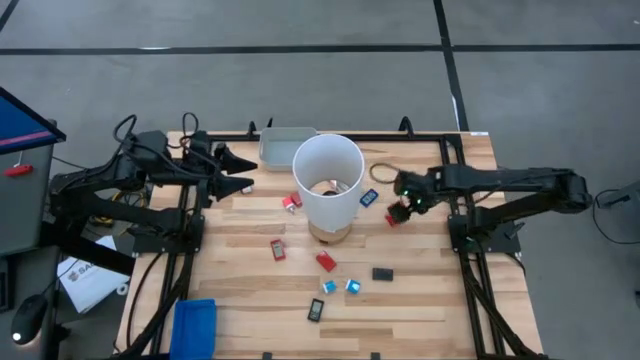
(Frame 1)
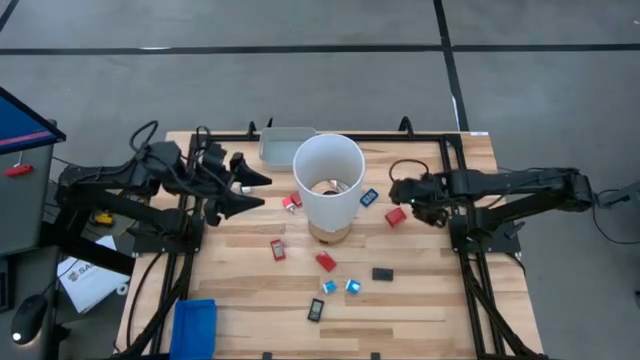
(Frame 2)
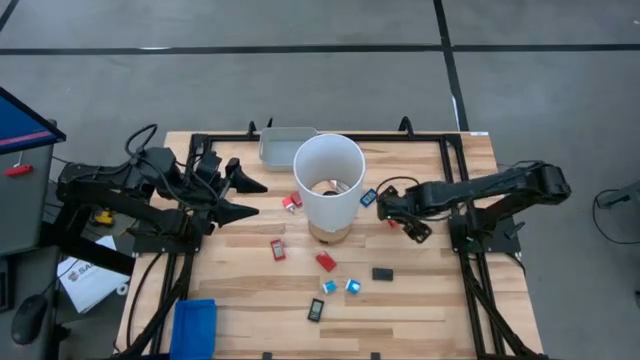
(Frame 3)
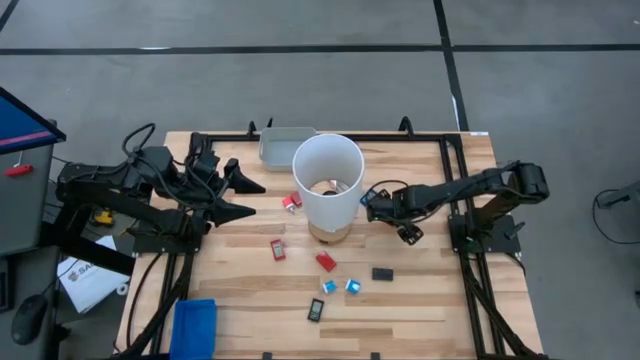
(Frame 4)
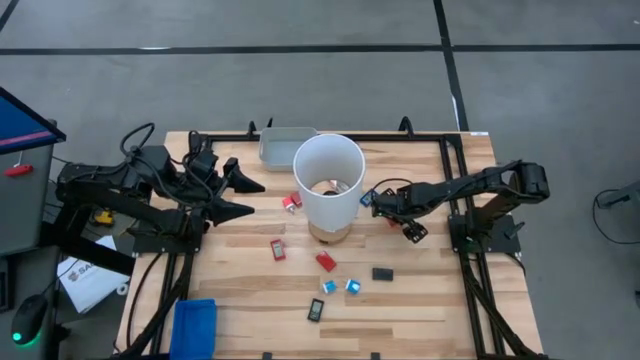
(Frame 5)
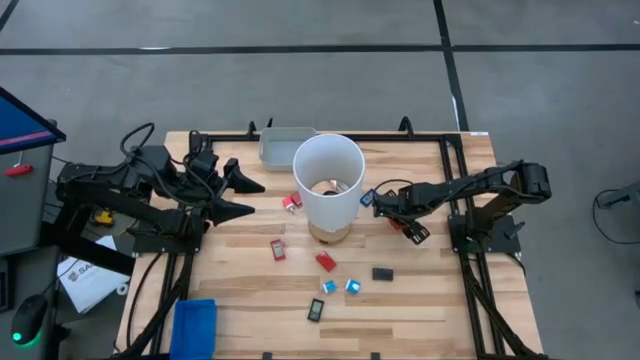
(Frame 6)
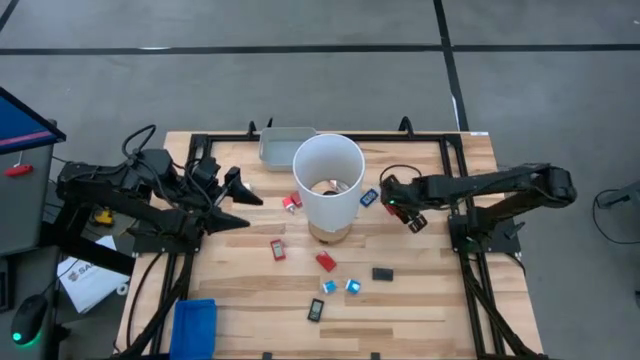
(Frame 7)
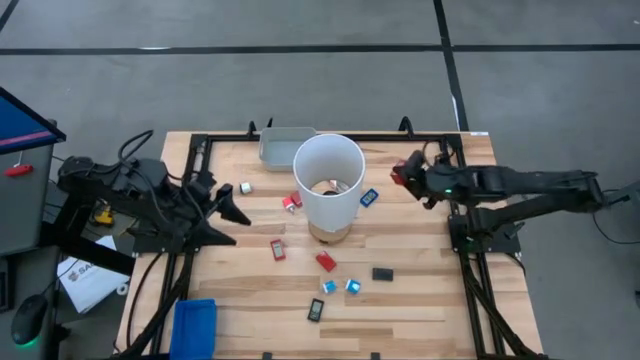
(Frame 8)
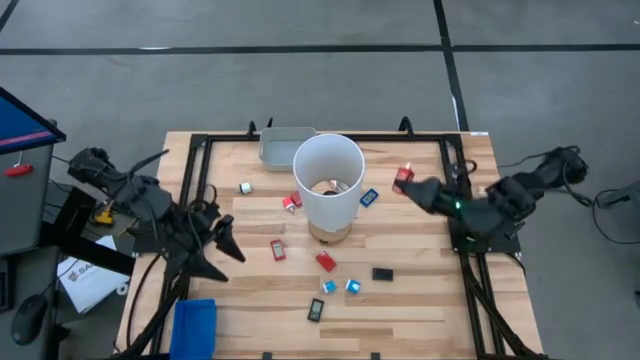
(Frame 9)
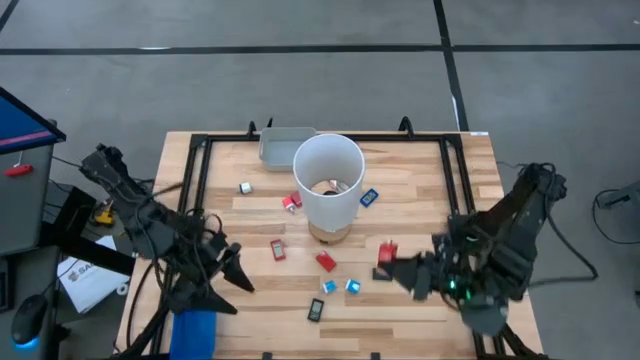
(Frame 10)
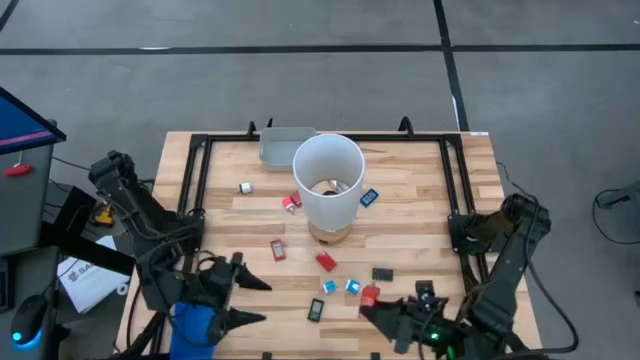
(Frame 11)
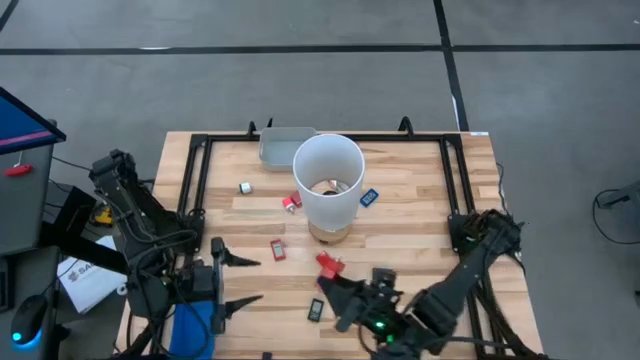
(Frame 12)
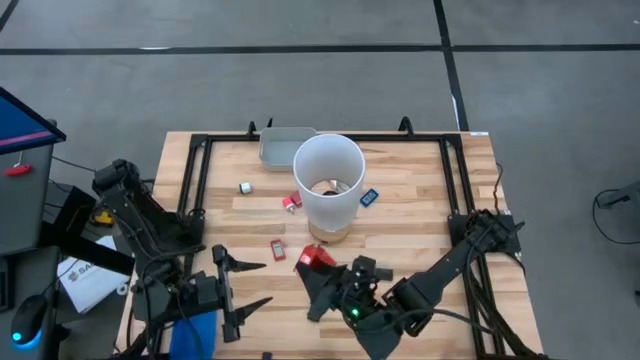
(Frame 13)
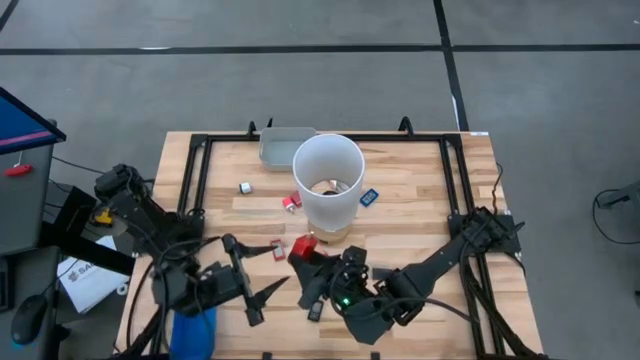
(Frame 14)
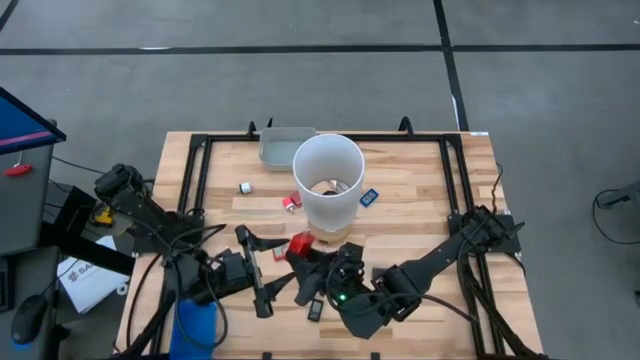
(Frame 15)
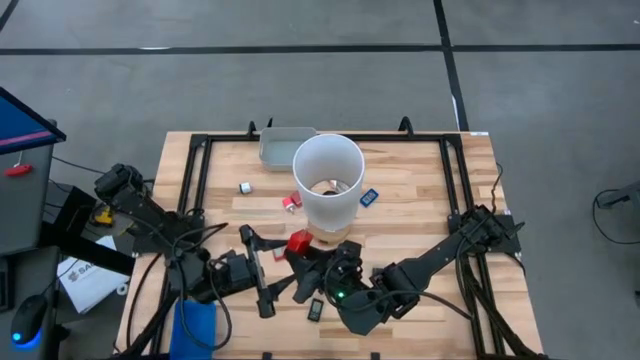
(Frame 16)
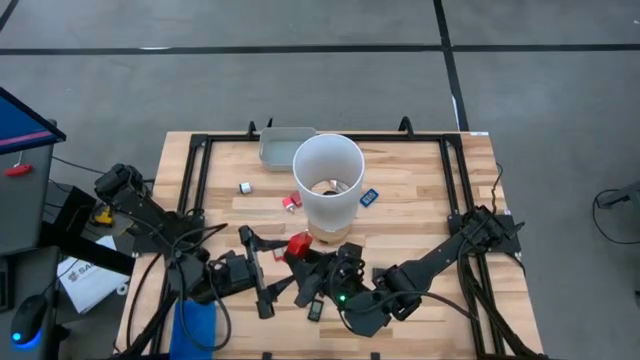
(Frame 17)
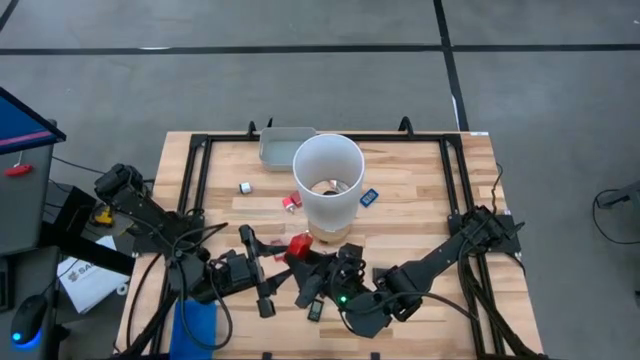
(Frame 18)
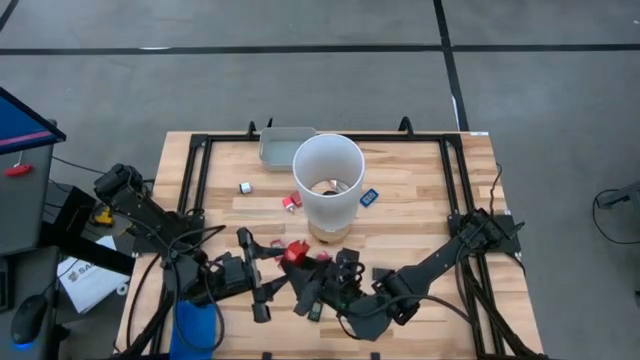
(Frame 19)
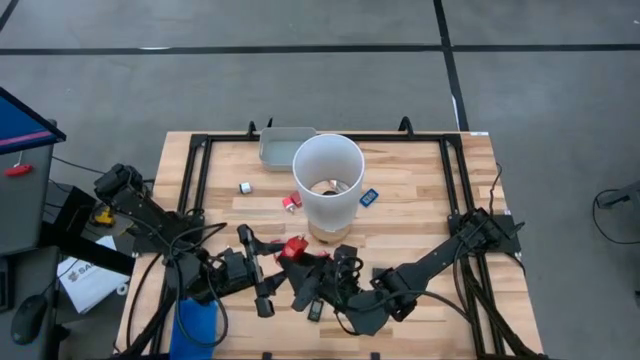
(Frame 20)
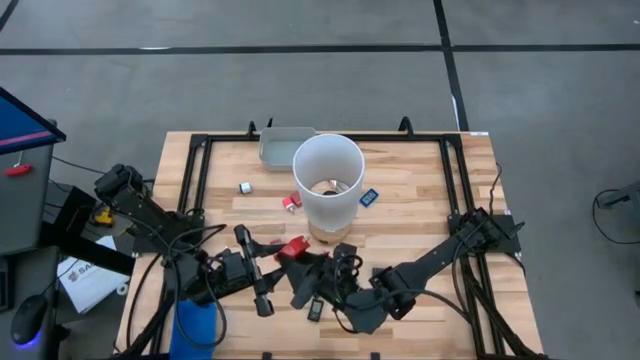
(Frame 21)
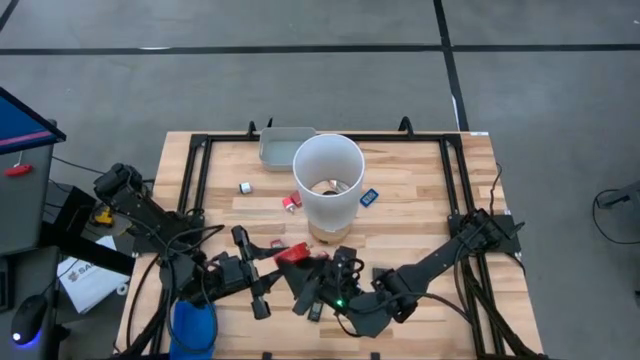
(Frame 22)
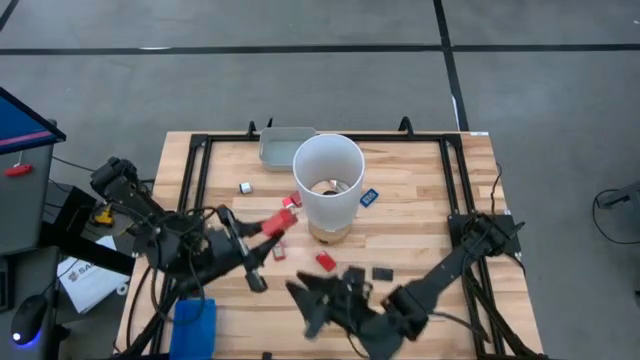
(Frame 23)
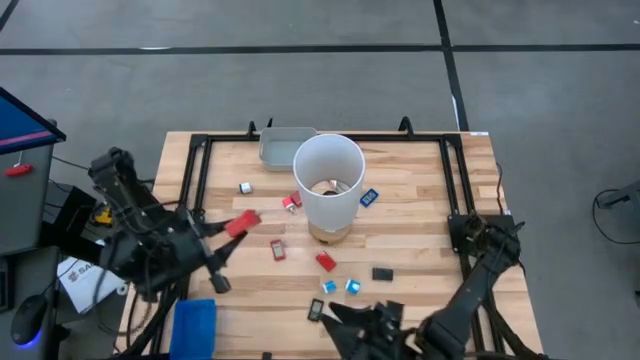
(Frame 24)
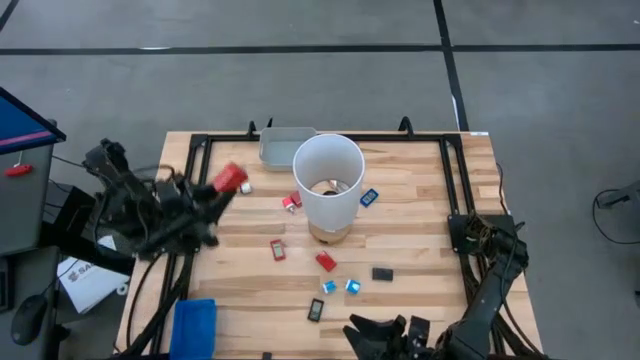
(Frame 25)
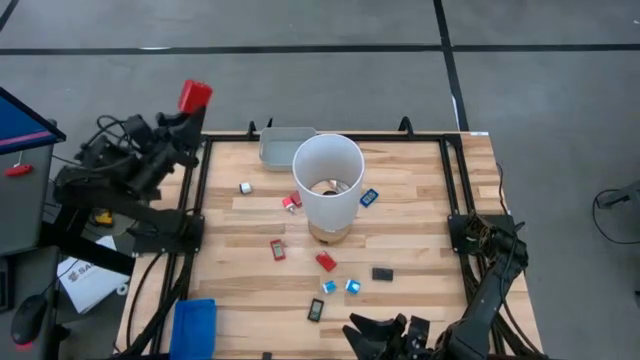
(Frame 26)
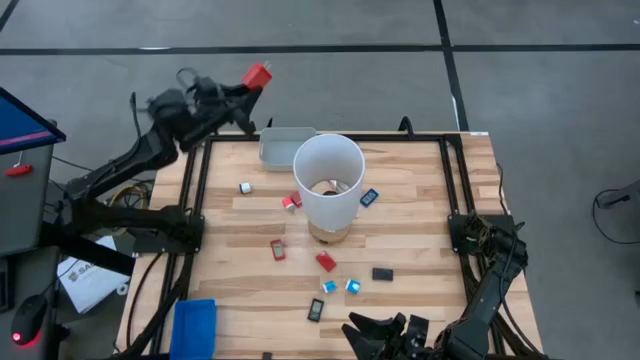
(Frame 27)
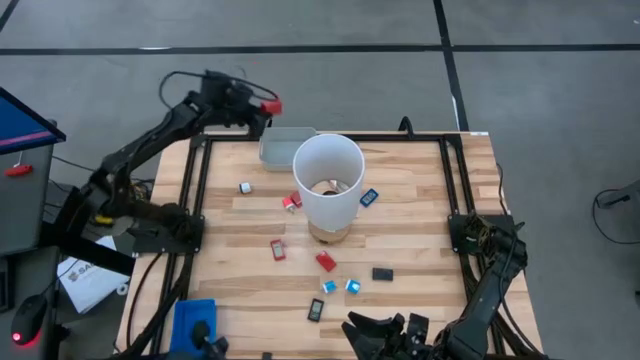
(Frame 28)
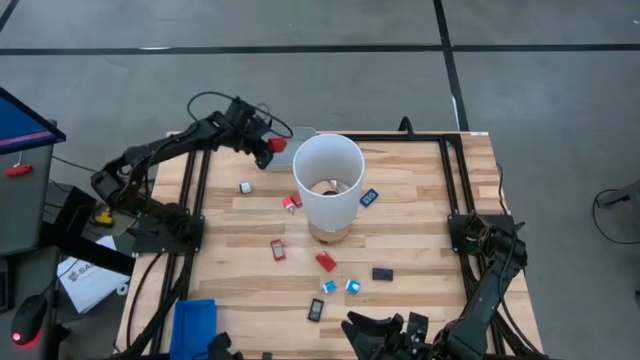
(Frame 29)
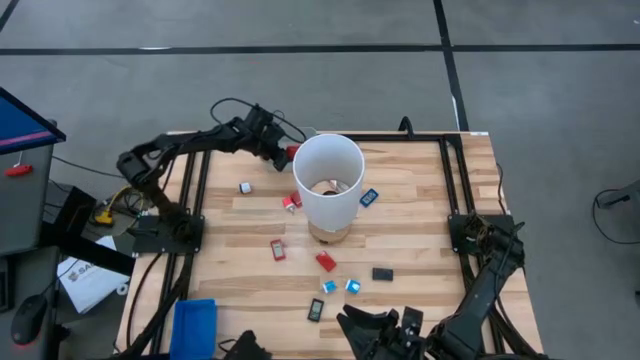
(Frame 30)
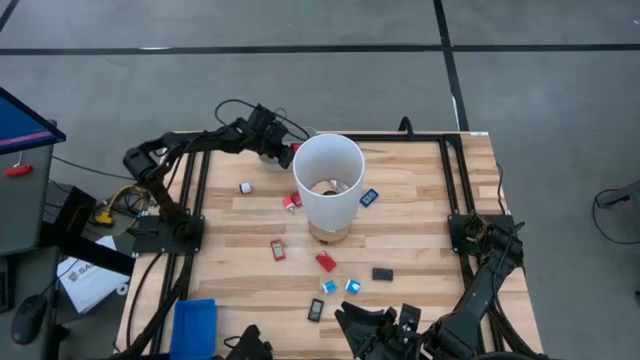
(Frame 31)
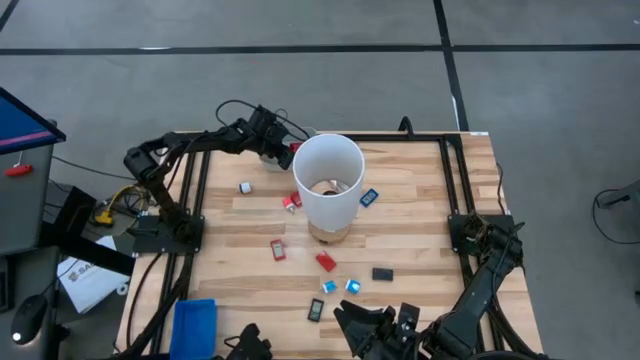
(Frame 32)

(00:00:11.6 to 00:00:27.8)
Task: Pick & Place Office items
Put the right red charger adapter into the gray bin

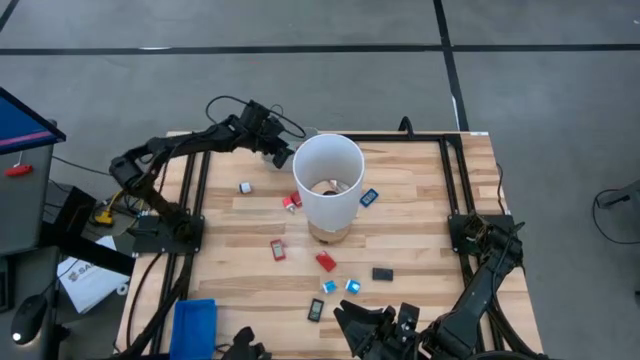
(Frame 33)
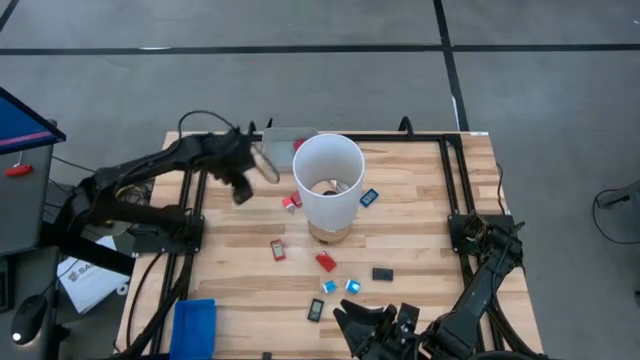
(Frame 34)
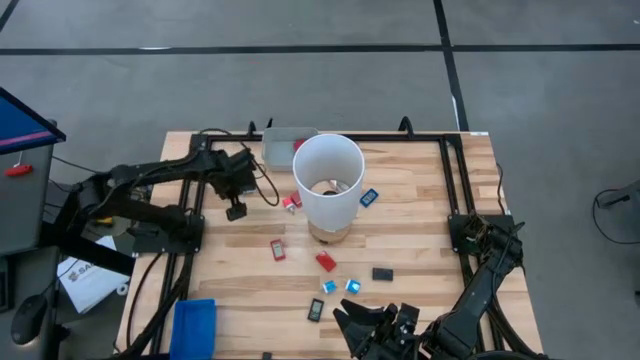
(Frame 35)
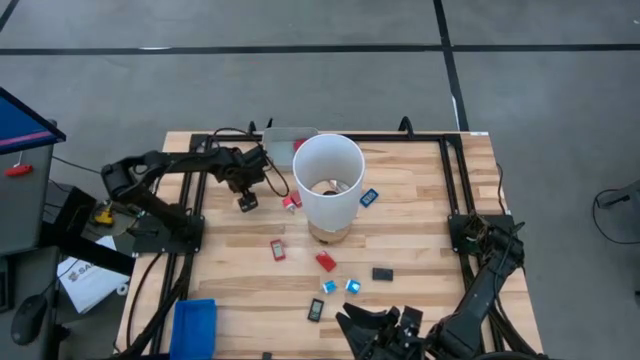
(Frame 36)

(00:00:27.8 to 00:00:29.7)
Put the white charger adapter into the gray bin

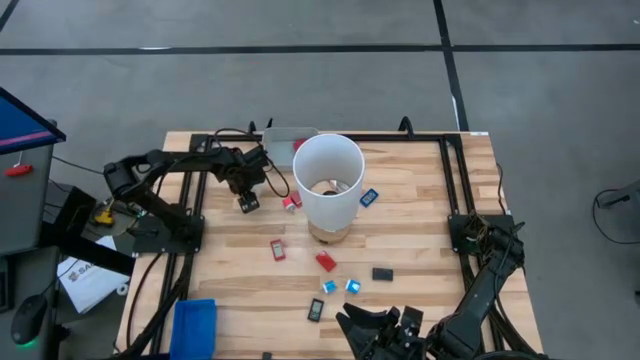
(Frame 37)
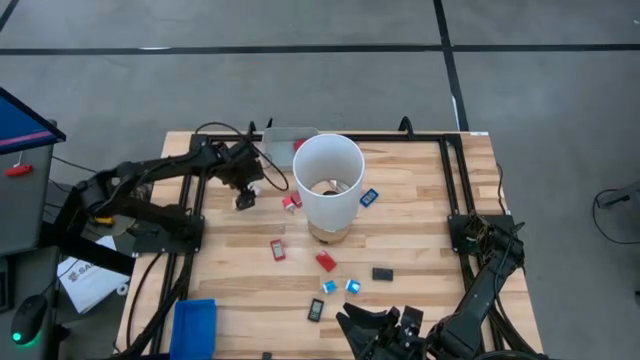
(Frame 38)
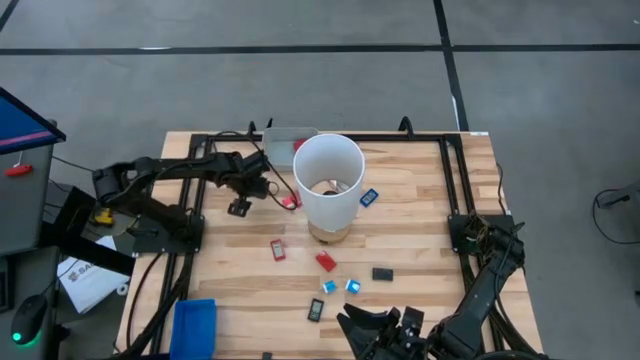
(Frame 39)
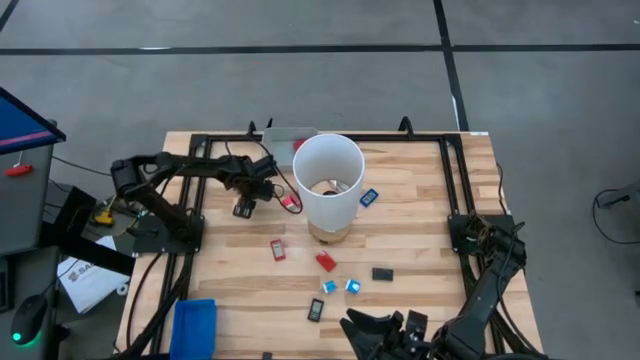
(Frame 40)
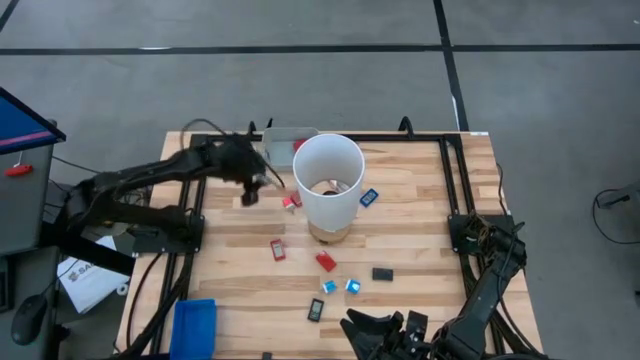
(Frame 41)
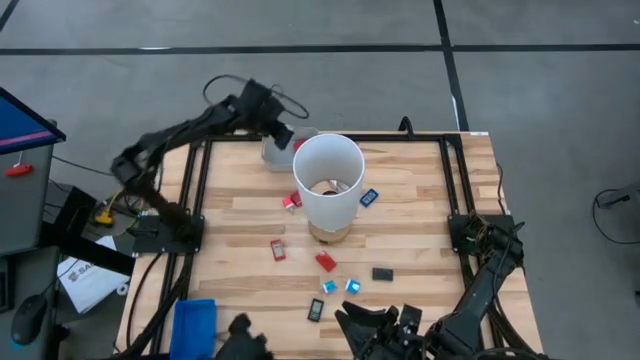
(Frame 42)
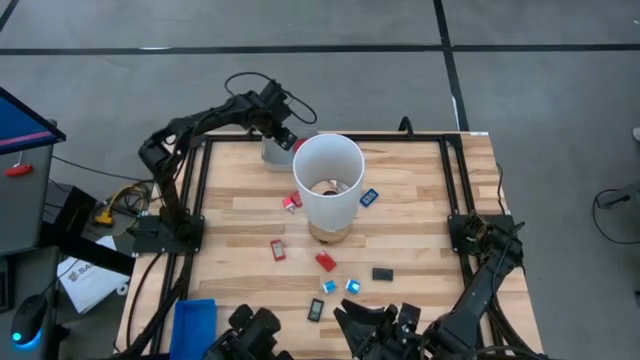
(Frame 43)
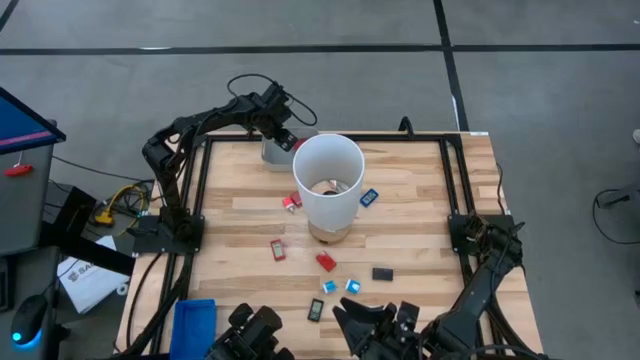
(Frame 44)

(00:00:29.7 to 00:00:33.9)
Put the white charger adapter into the gray bin
